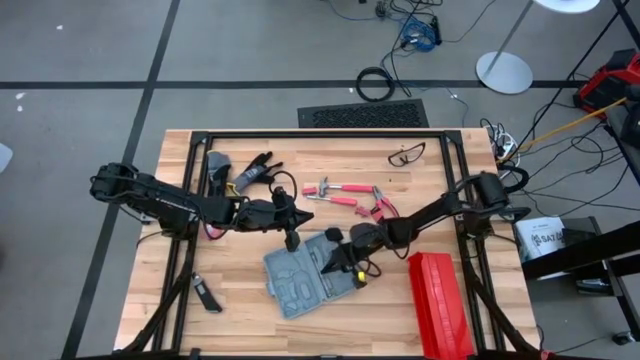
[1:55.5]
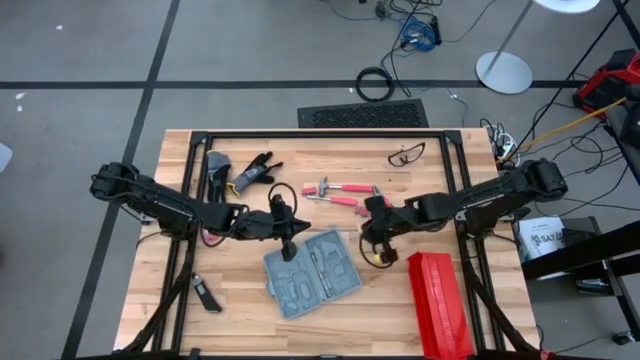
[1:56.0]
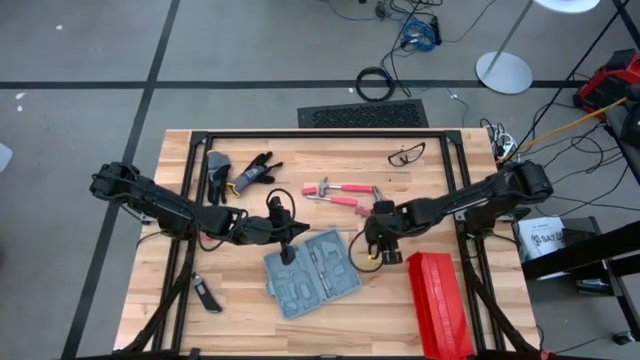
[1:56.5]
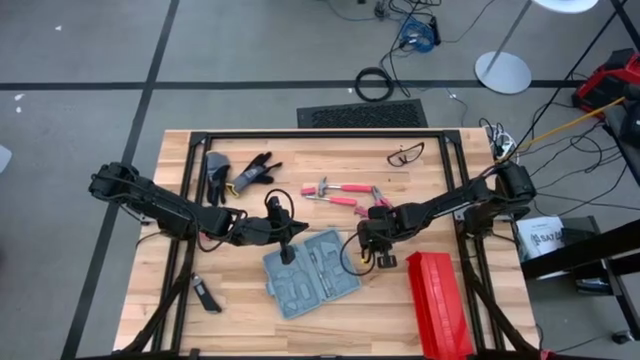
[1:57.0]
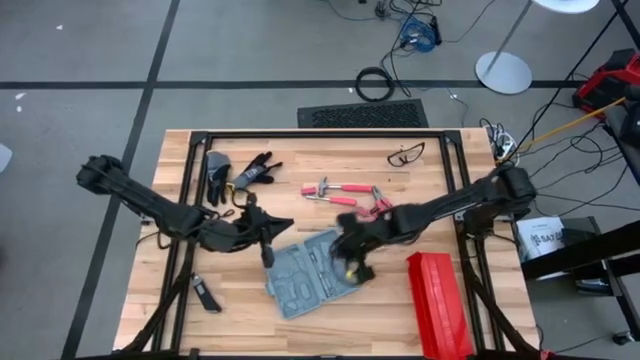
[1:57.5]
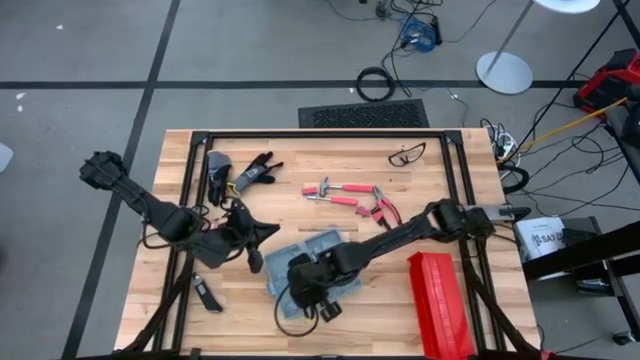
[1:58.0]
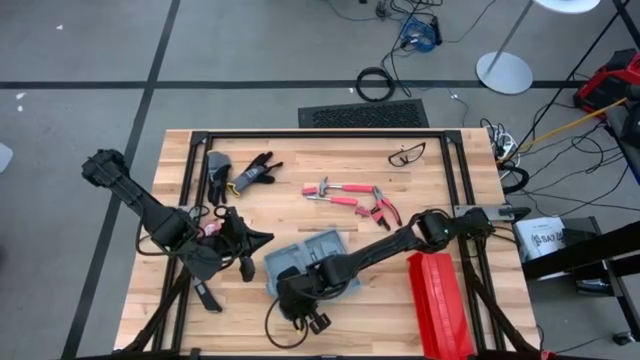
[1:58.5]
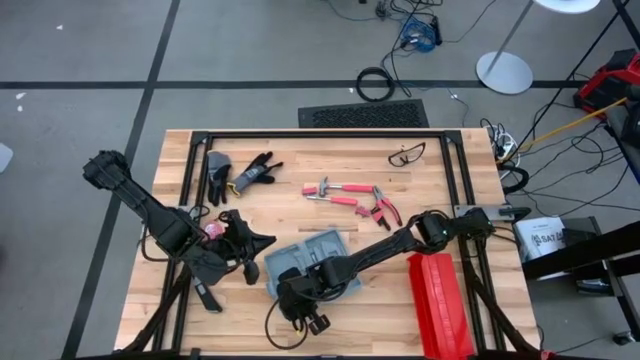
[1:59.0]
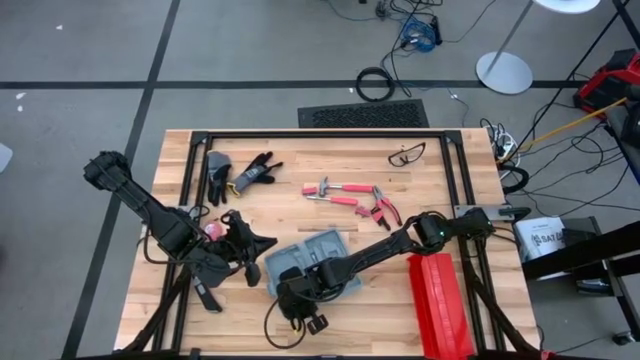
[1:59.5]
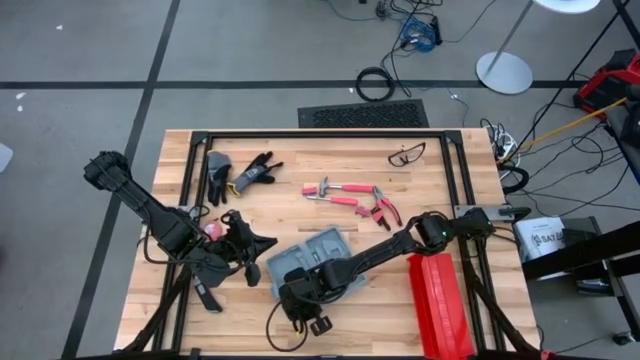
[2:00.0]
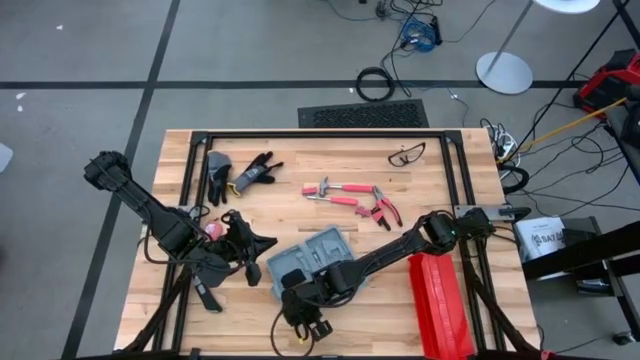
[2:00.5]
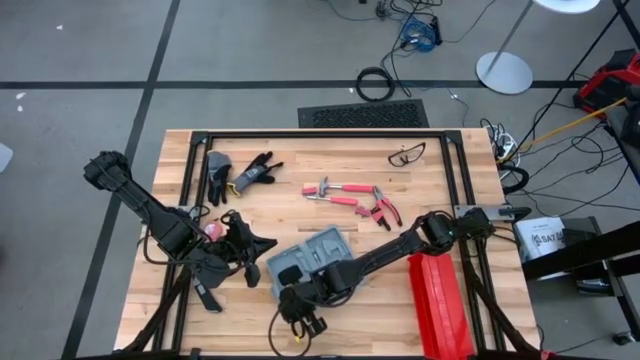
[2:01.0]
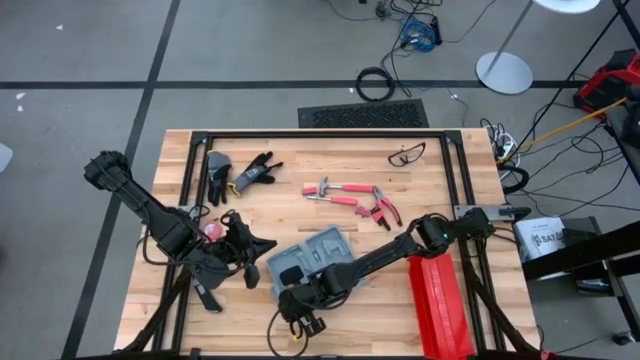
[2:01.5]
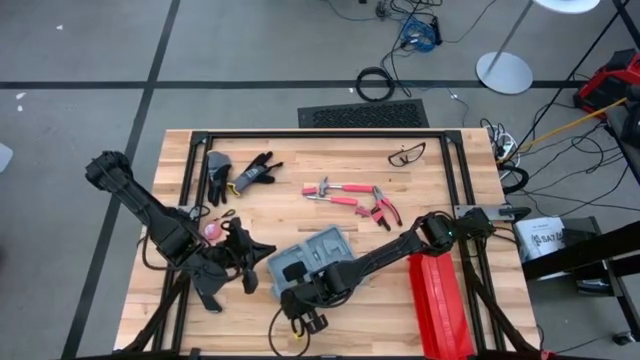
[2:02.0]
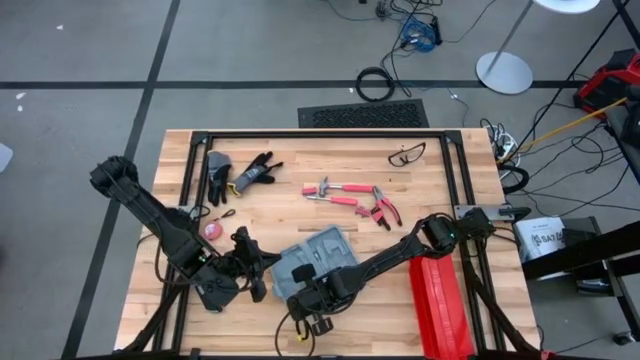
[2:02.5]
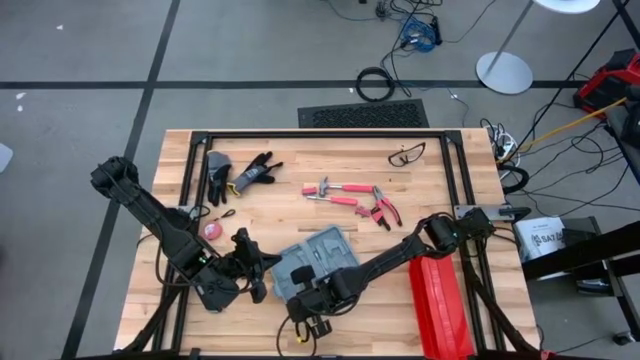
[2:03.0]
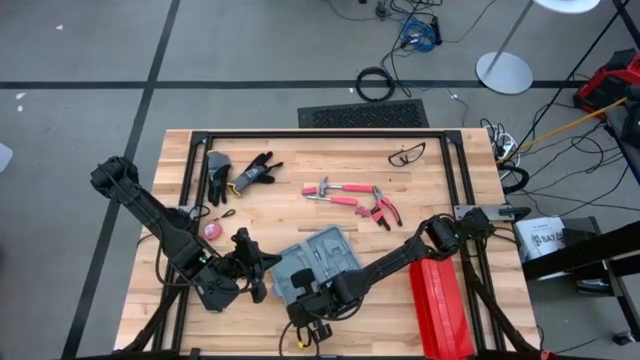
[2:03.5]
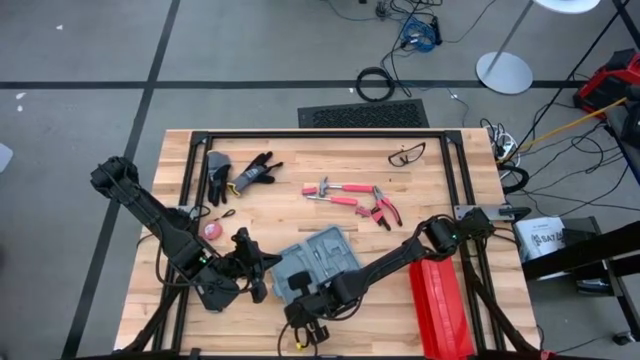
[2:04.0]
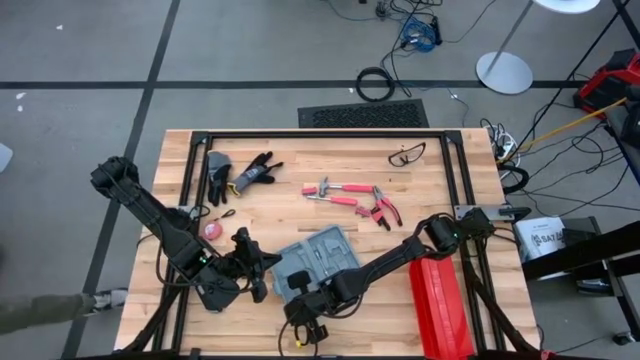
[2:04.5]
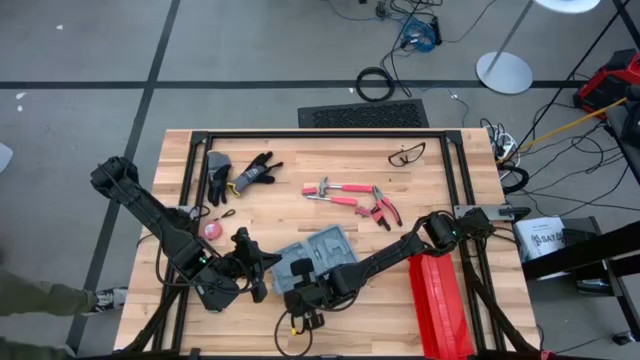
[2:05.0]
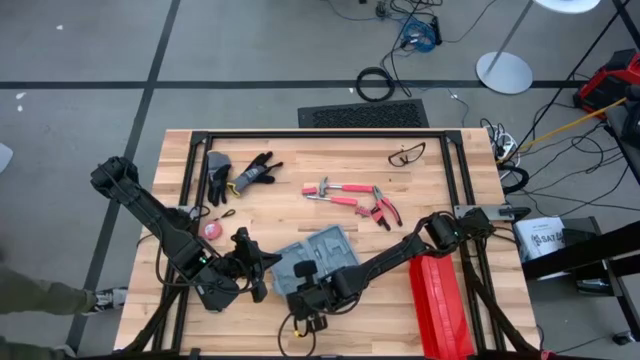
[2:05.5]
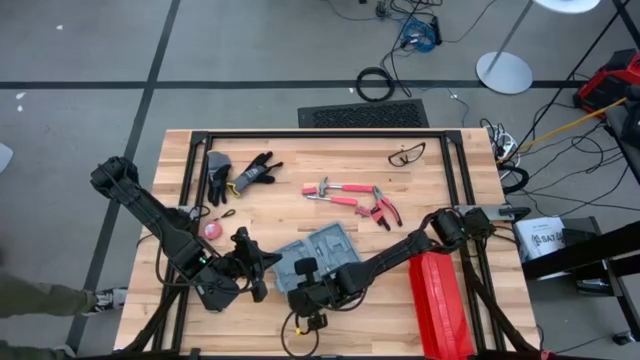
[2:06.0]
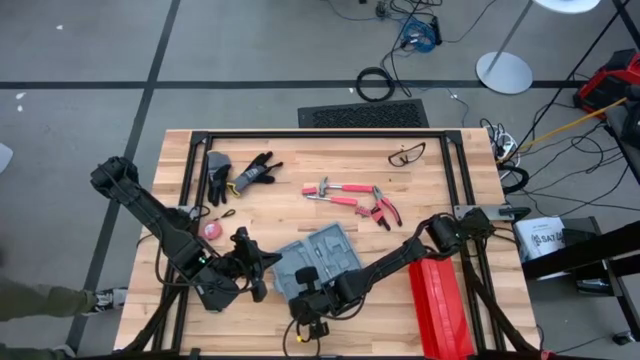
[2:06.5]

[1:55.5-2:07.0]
Task: prefit tool cases
Put the black electrical tape into the gray prefit tools case

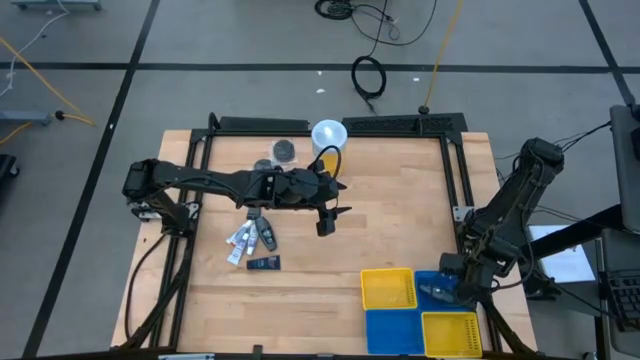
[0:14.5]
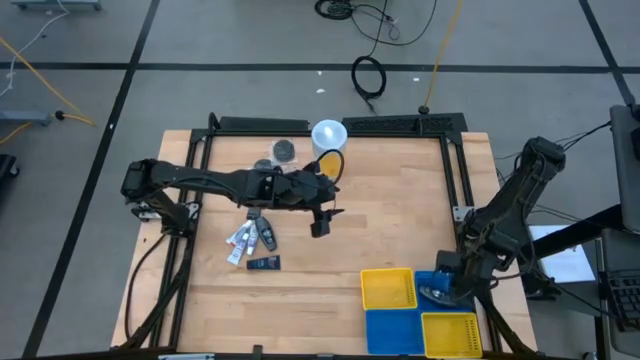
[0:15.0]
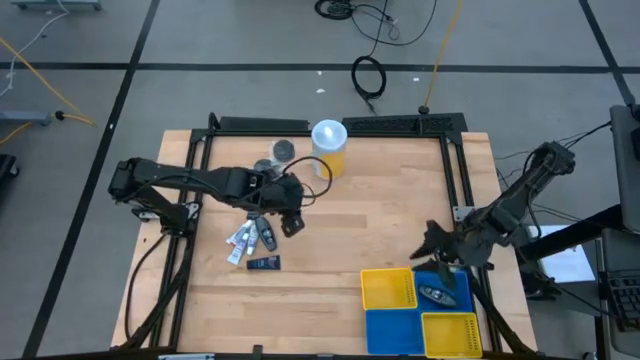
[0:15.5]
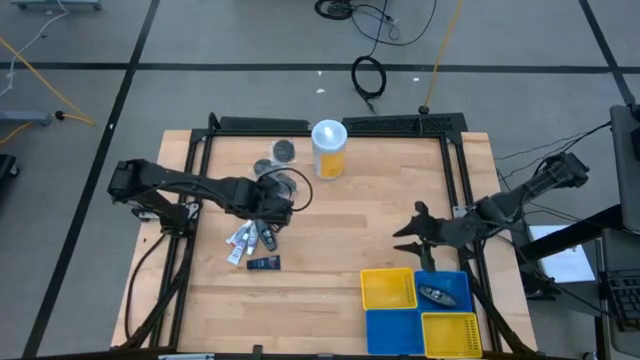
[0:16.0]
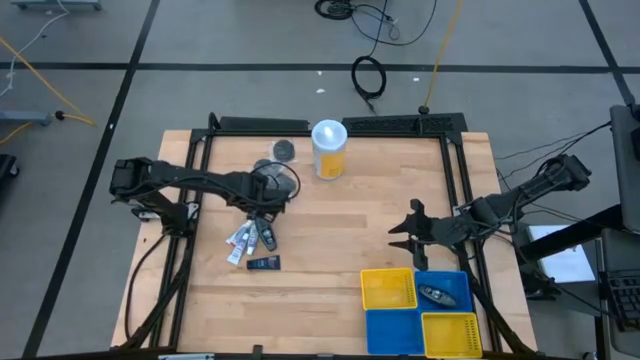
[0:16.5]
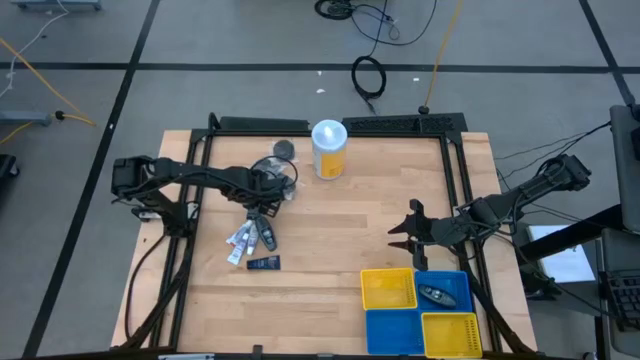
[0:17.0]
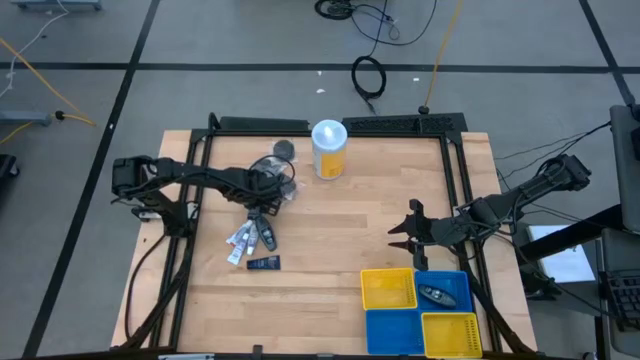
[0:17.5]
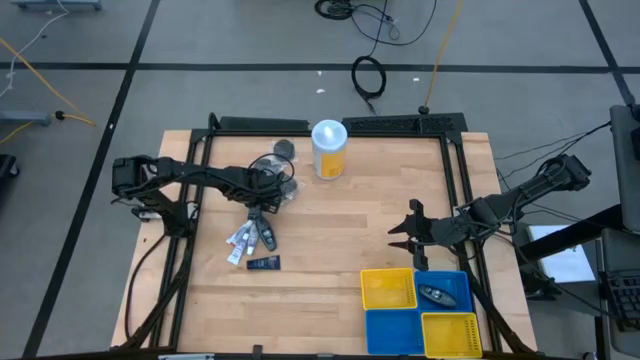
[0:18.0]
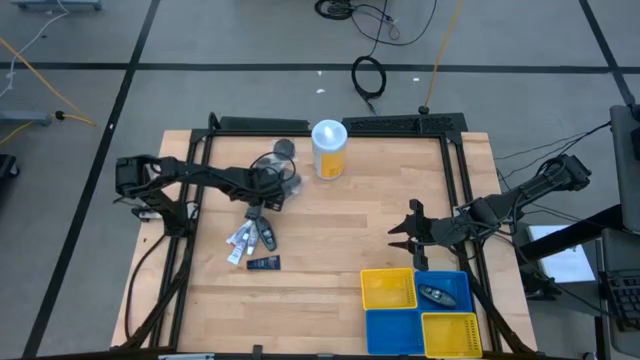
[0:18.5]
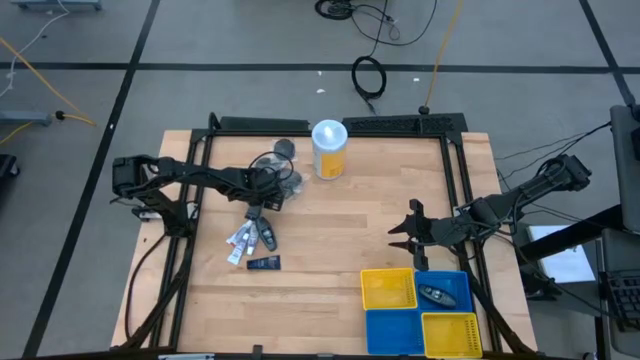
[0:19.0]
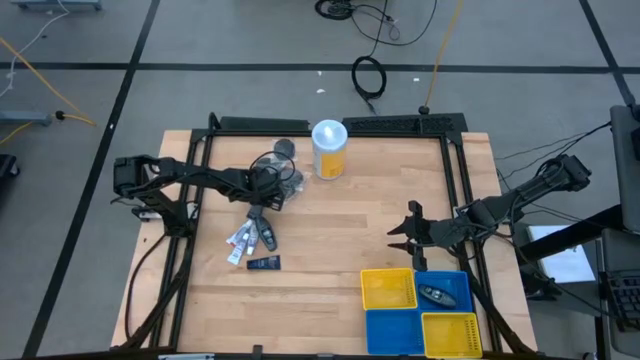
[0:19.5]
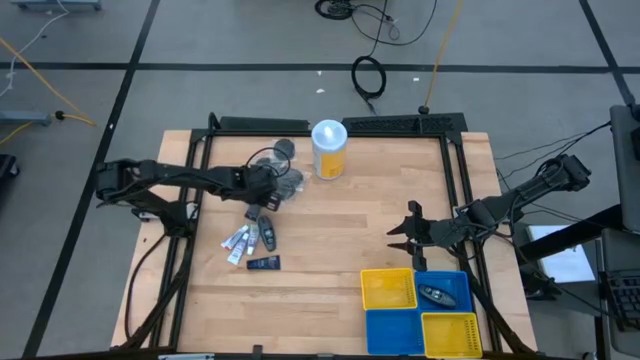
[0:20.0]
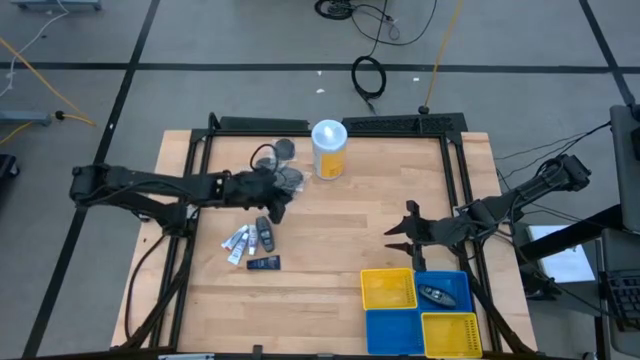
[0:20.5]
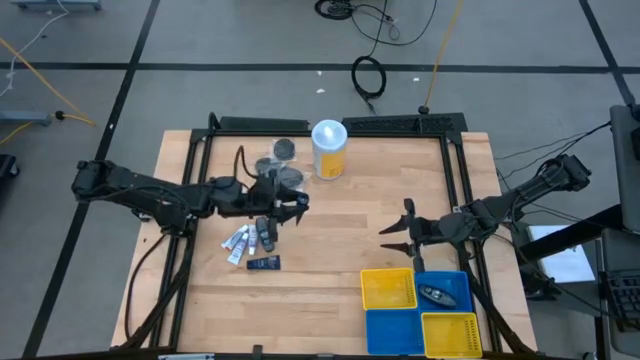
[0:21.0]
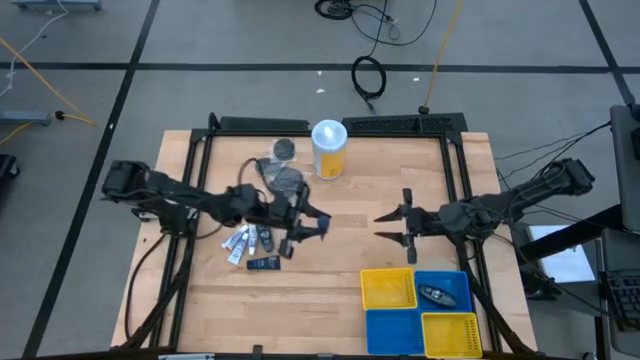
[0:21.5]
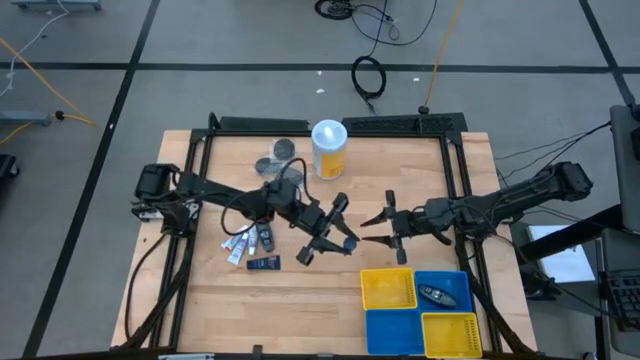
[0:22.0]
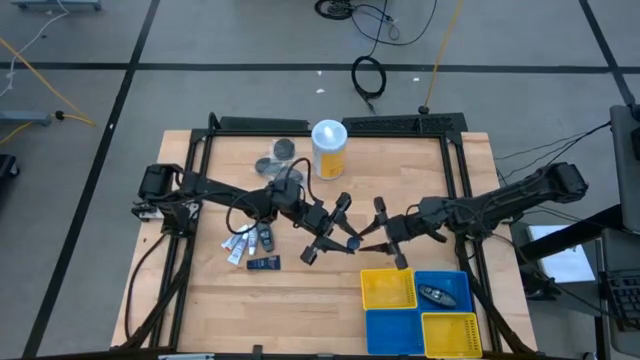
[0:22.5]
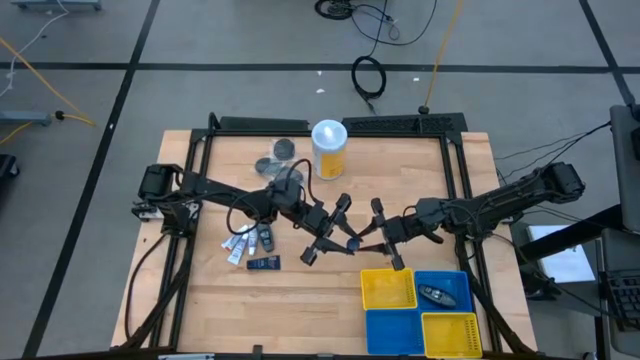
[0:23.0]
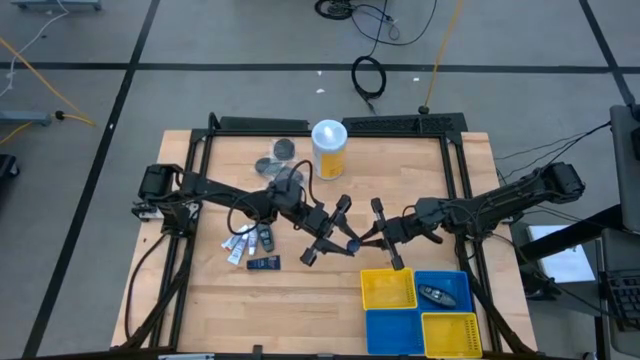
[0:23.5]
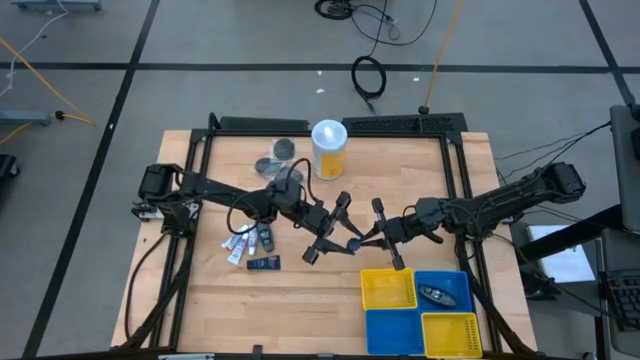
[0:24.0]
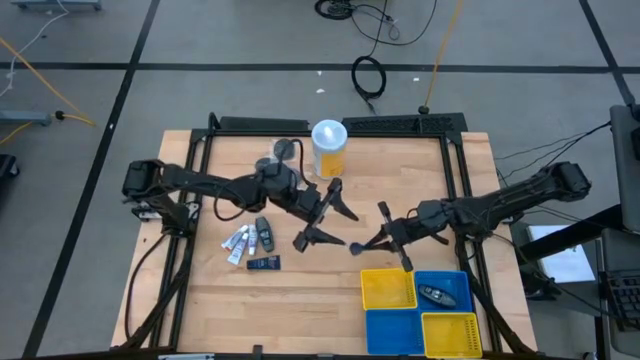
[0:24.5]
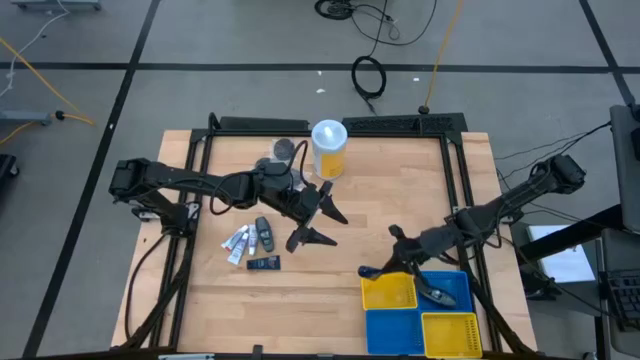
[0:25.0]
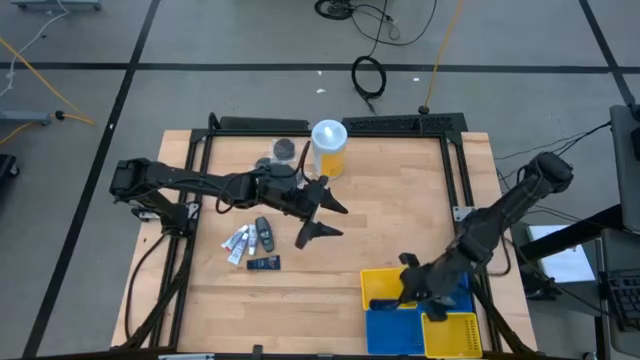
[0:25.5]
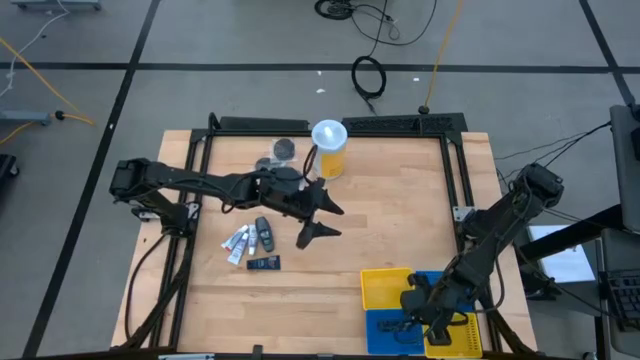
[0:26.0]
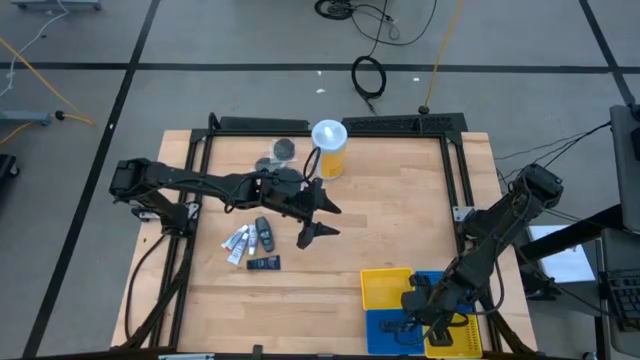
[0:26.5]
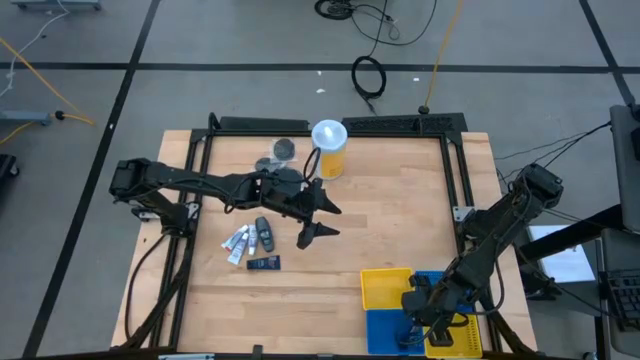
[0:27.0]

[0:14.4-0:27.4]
Task: Pick & Place Travel size toiletries
Put the top shave cream into the bottom blue basket
